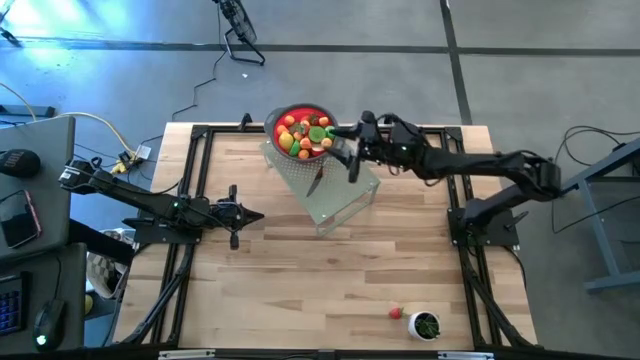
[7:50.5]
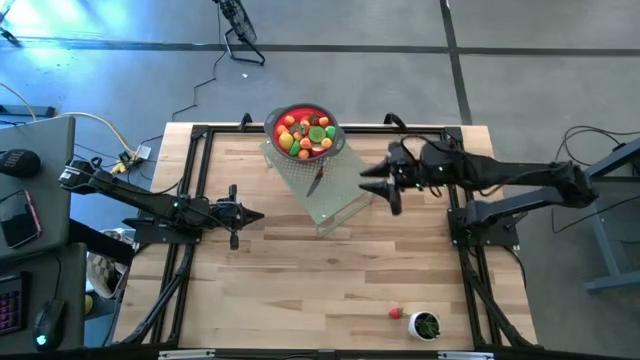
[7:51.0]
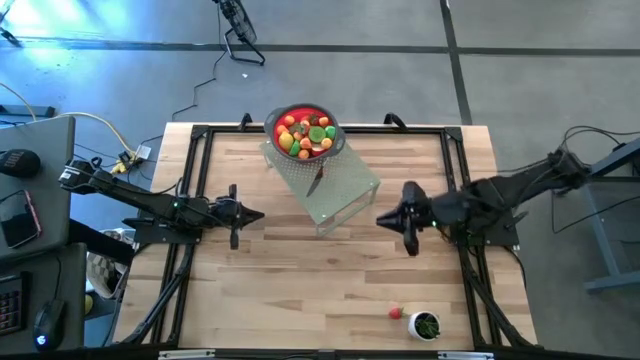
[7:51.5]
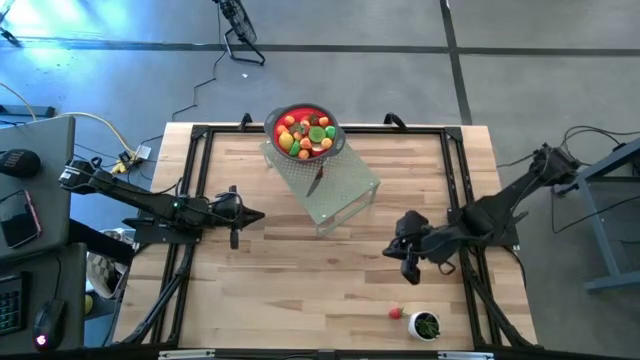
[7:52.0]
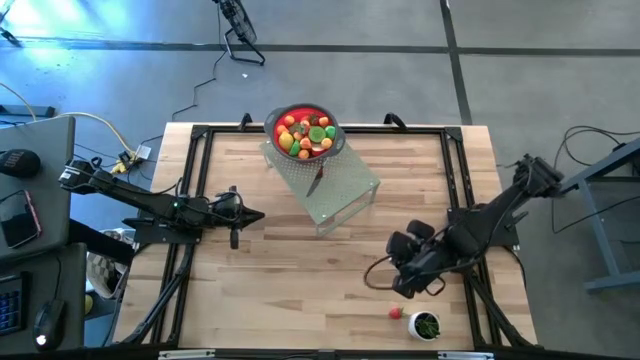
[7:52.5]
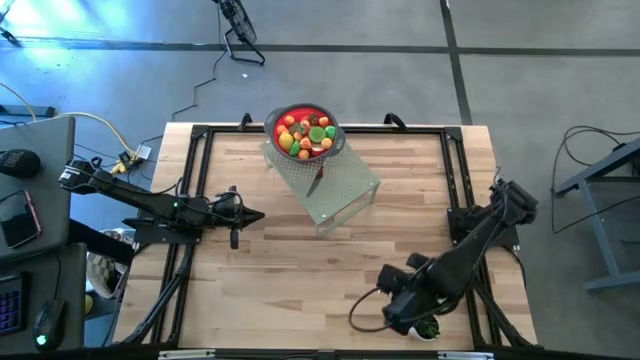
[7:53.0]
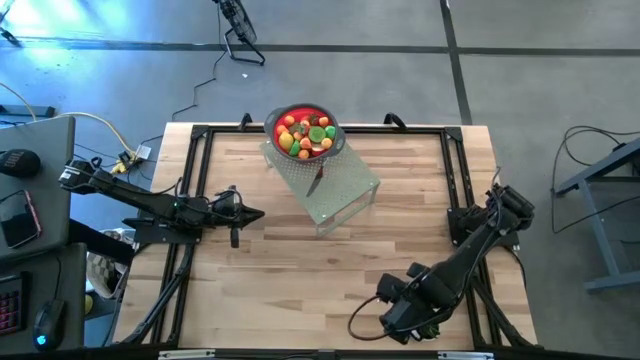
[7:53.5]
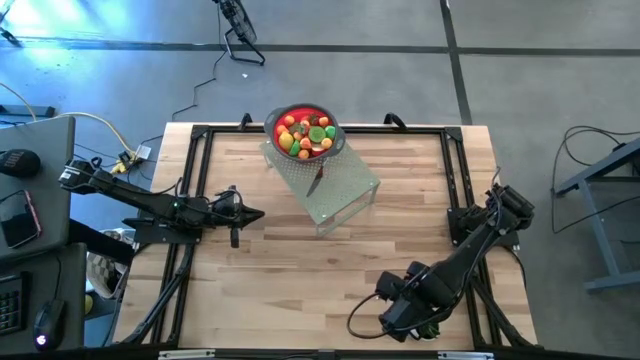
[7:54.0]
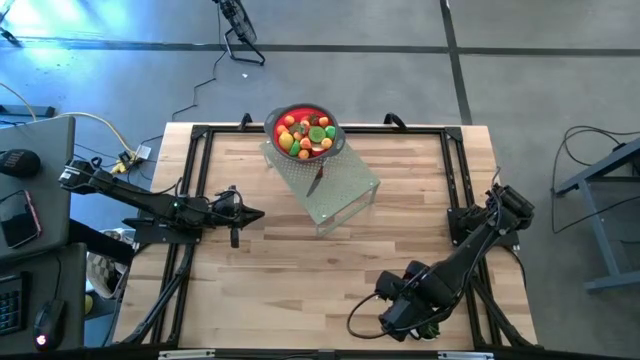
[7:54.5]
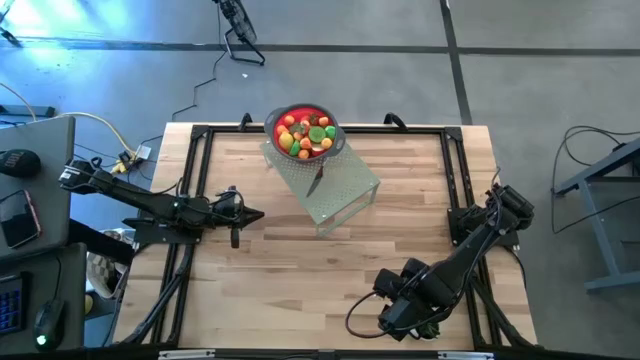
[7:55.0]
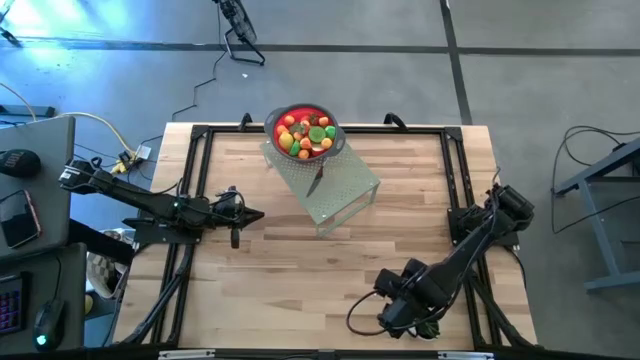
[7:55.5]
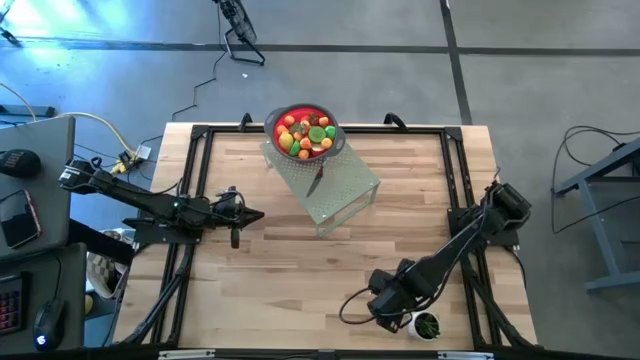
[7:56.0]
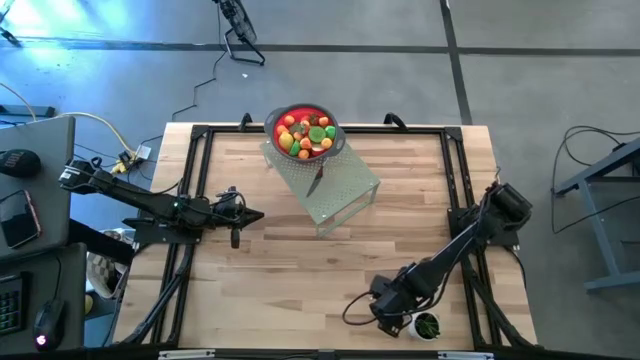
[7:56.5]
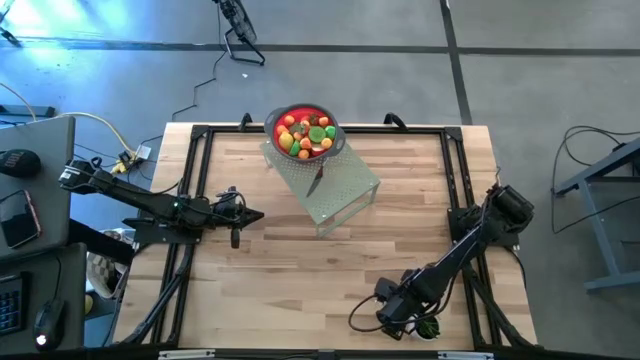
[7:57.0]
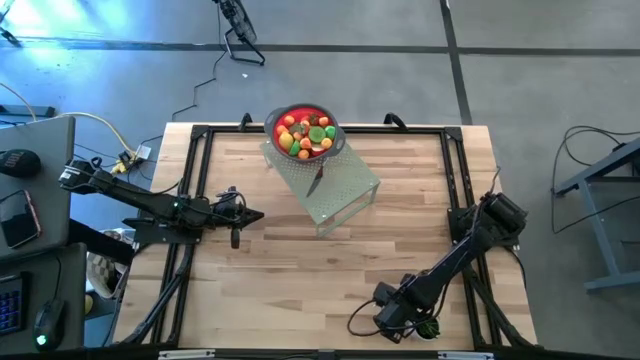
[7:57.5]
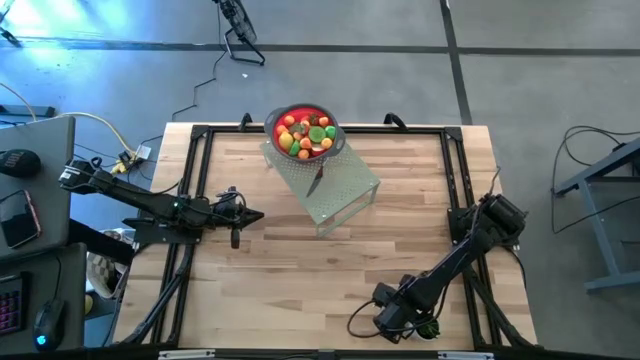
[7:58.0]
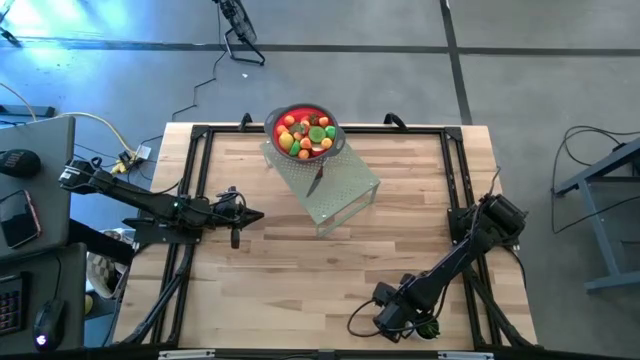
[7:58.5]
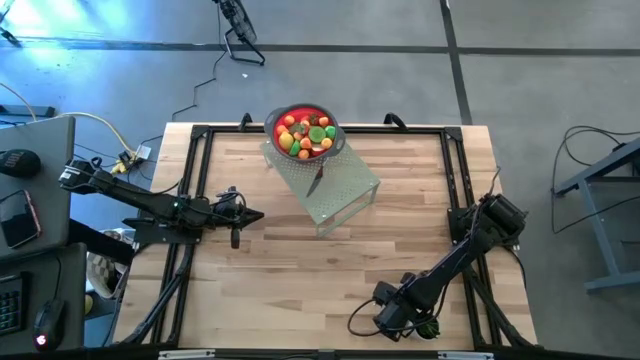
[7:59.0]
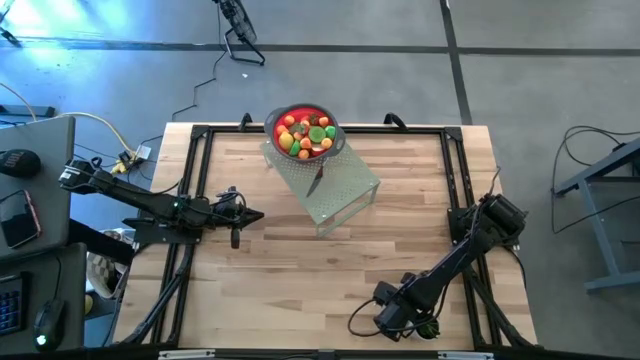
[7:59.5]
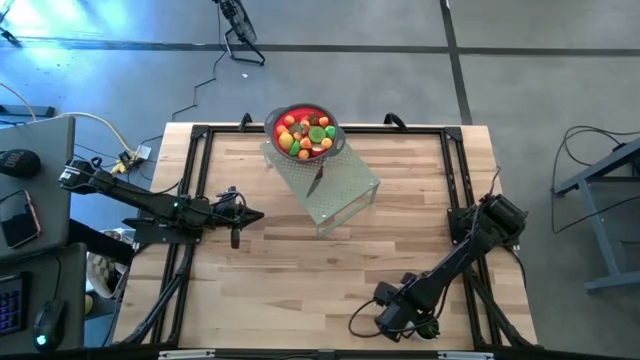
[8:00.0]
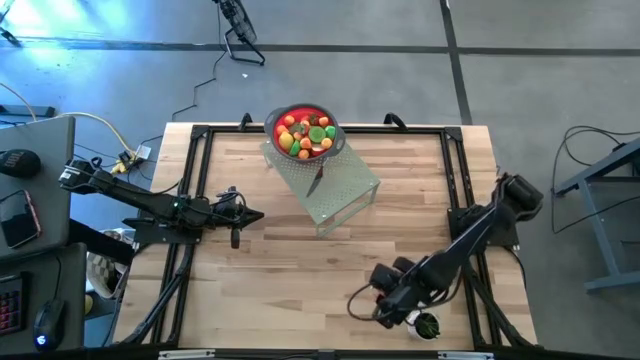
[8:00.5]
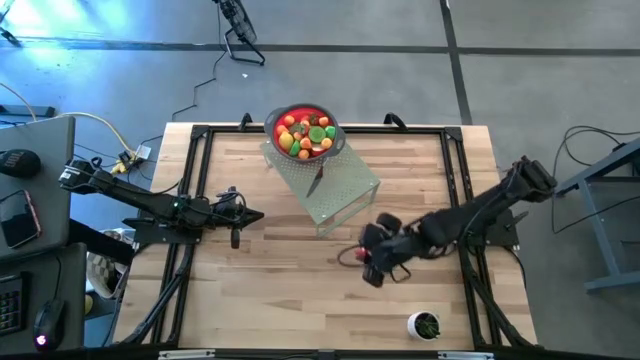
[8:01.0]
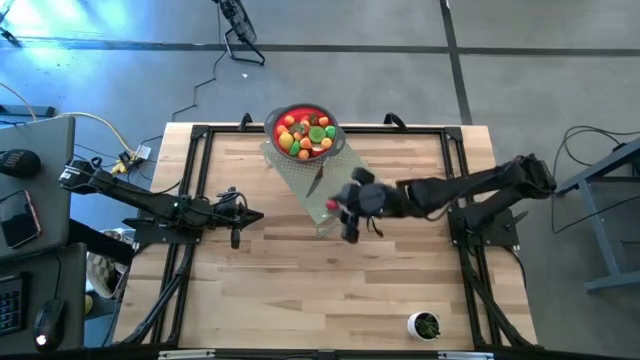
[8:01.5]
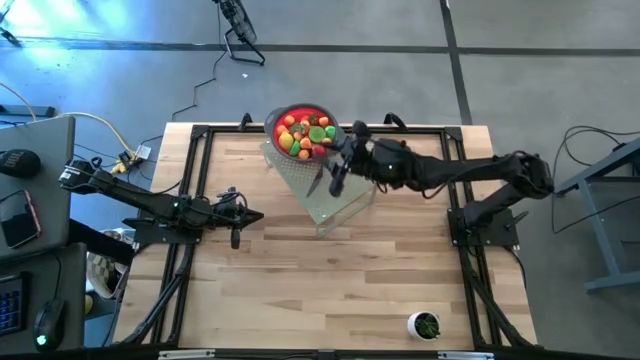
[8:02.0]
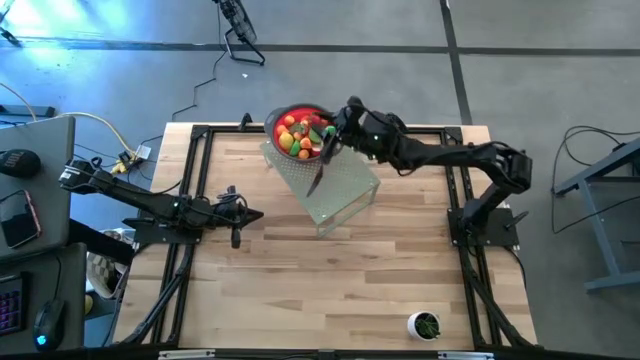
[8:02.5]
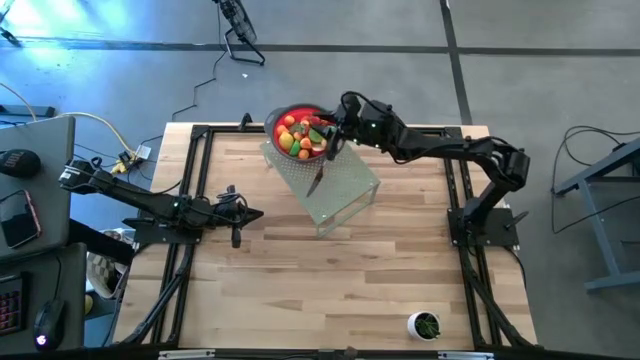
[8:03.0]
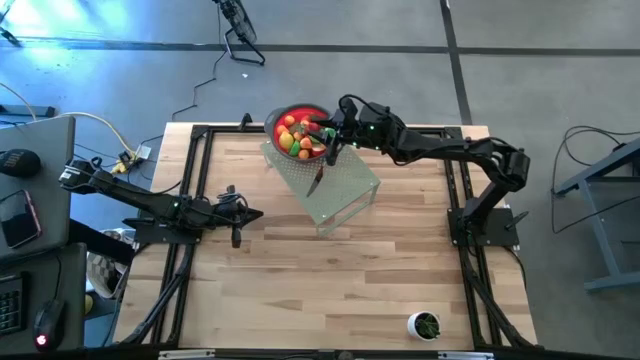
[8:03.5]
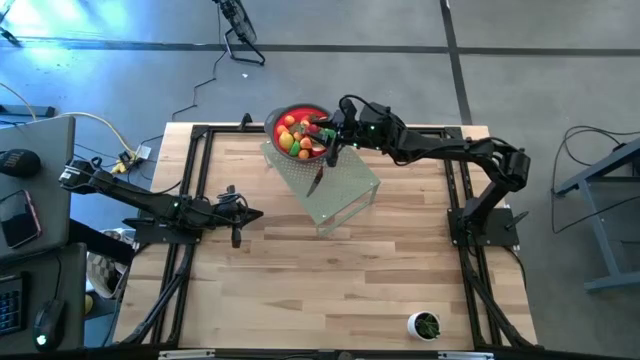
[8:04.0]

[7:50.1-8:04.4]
Task: Pick & Place Fruit
Put the strawberry into the red strainer on the shelf

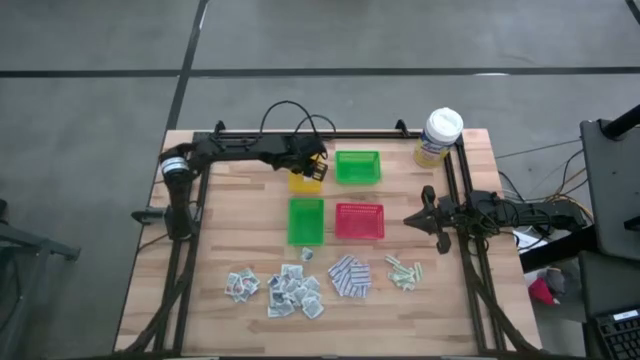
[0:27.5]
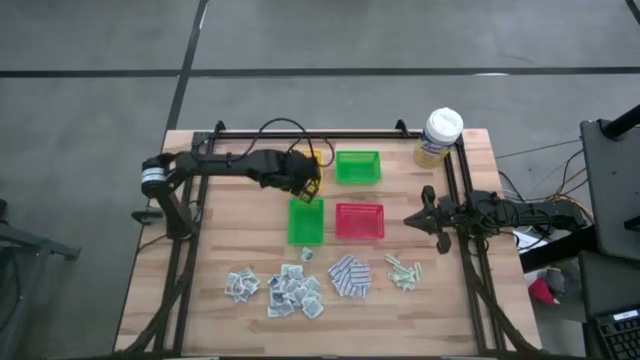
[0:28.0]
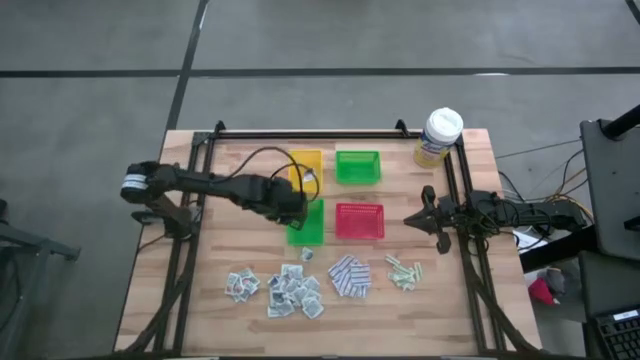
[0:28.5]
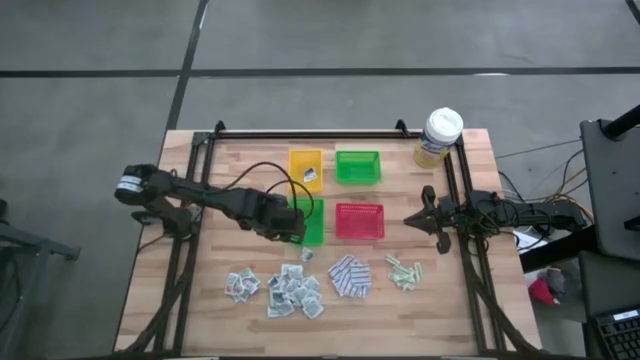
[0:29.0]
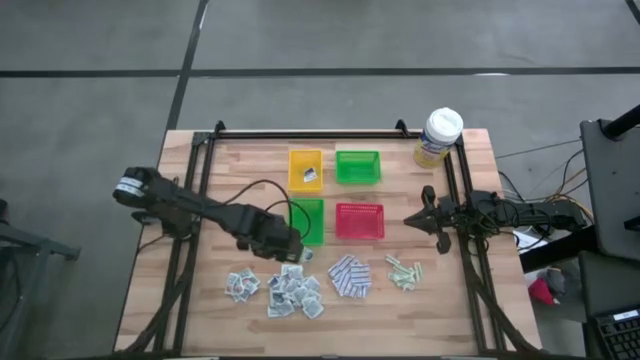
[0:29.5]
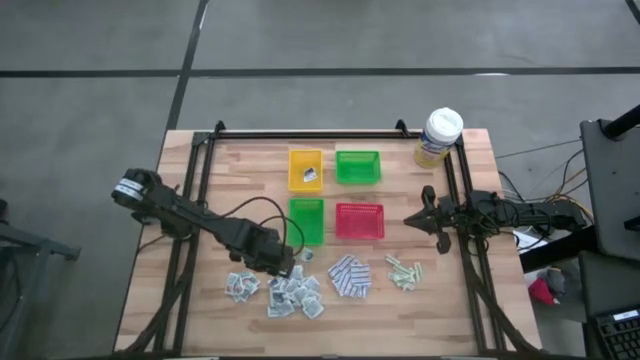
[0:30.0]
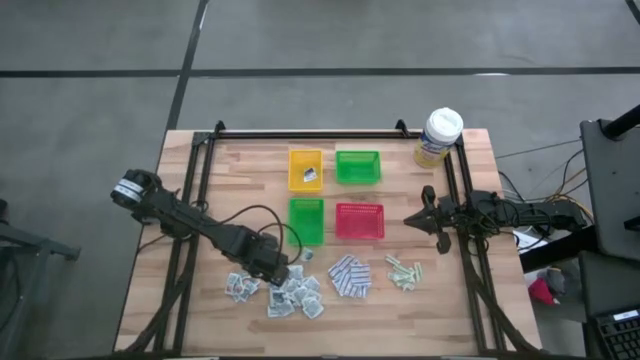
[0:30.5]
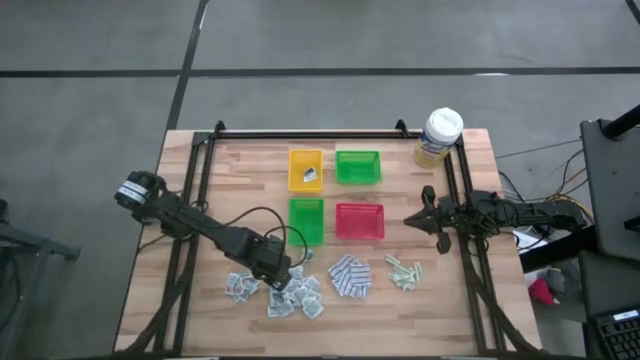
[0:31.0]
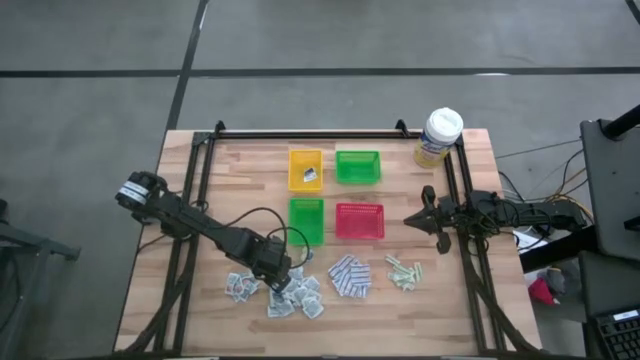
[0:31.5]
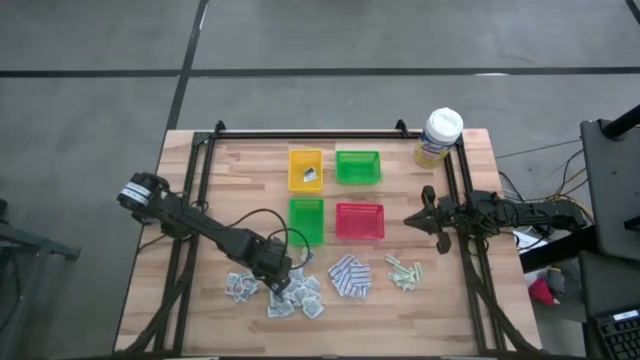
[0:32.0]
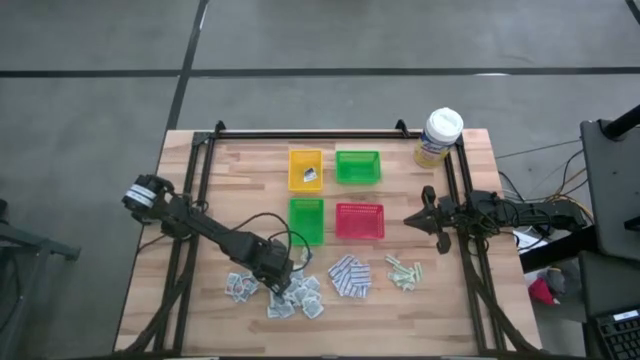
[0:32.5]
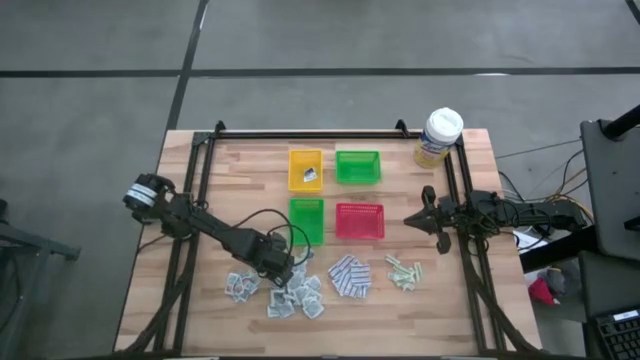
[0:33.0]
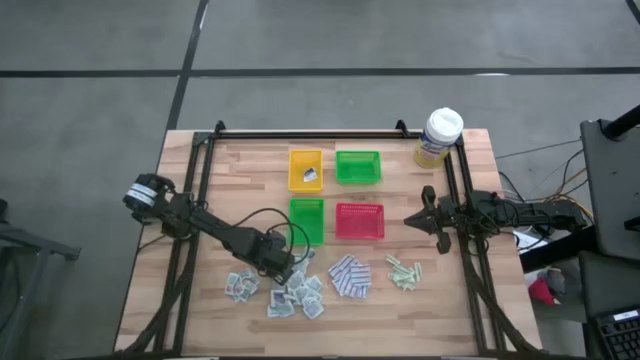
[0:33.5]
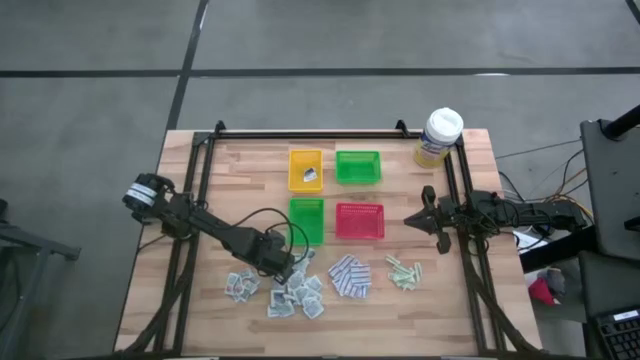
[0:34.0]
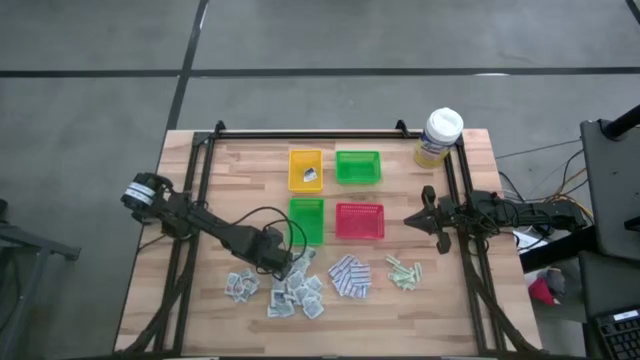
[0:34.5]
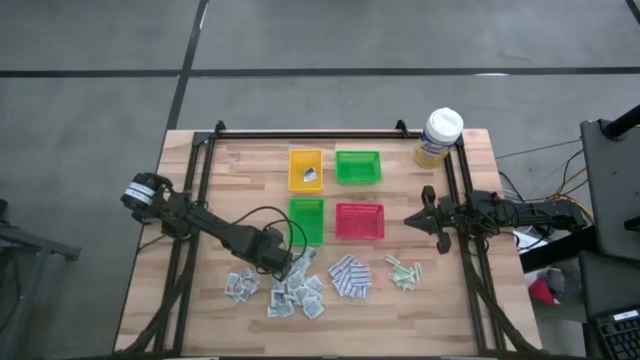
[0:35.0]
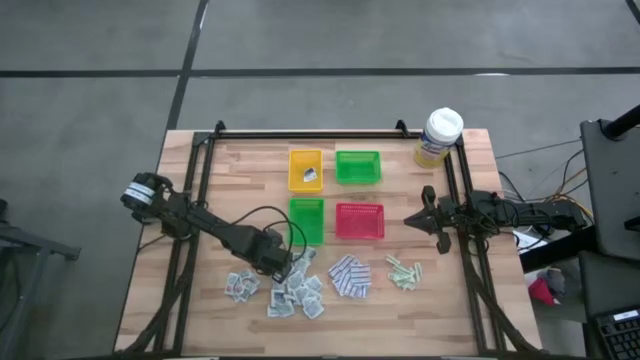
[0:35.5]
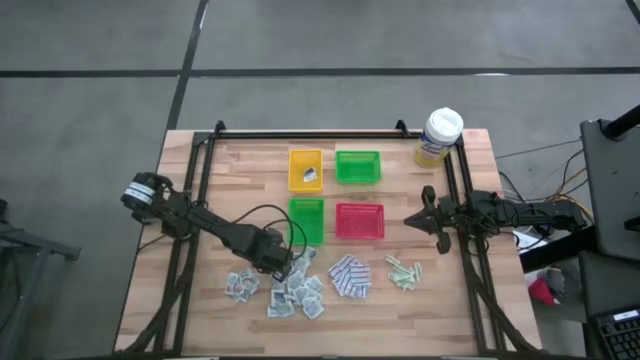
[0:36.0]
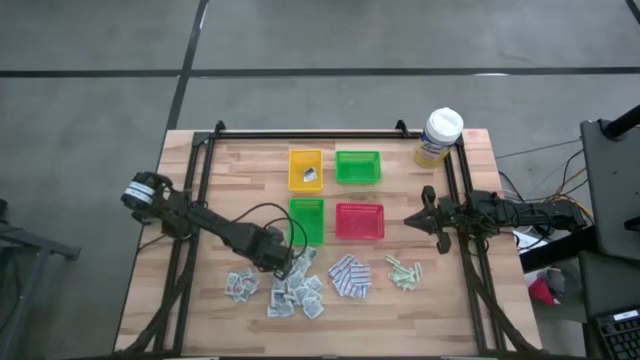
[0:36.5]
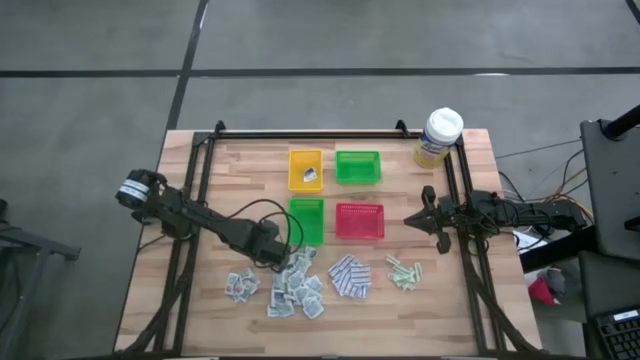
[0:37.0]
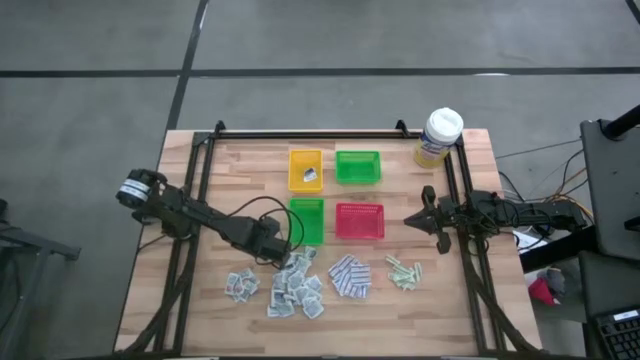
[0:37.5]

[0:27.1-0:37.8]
Task: Pick & Place First Aid Supplies
Put the blue alcohol pad into the yellow bin
